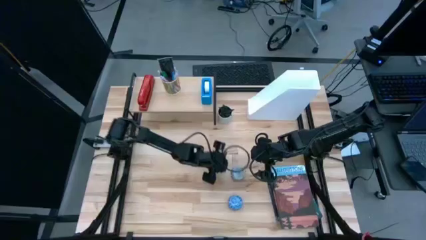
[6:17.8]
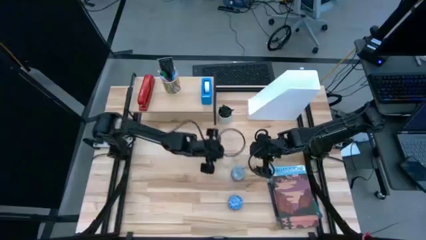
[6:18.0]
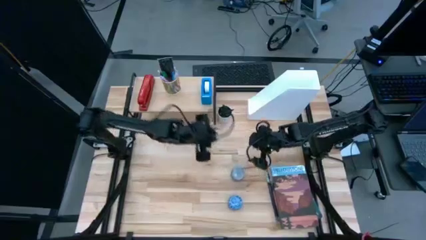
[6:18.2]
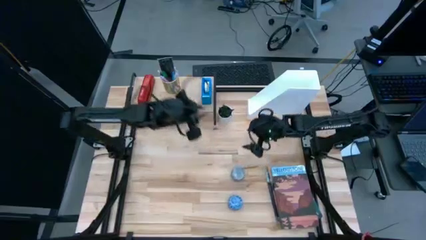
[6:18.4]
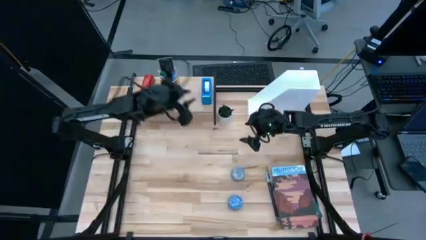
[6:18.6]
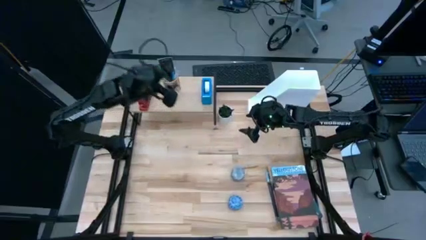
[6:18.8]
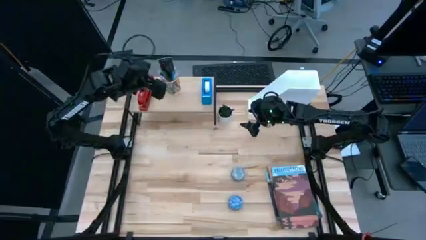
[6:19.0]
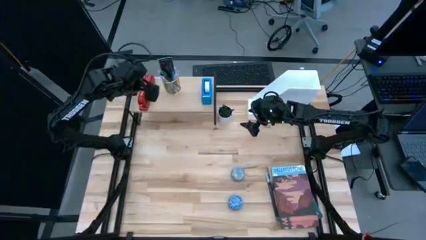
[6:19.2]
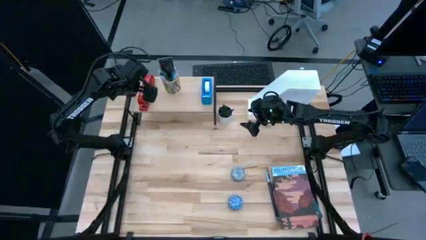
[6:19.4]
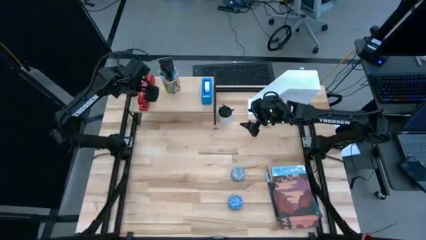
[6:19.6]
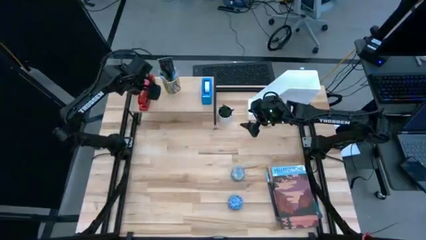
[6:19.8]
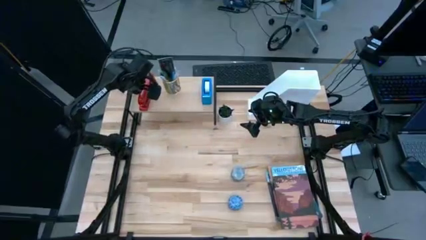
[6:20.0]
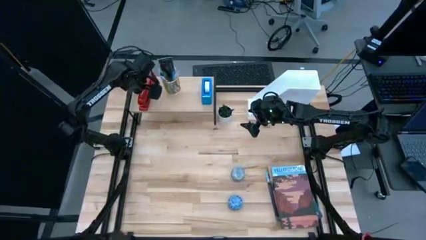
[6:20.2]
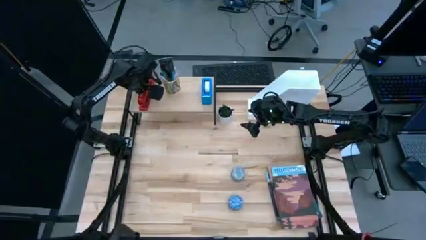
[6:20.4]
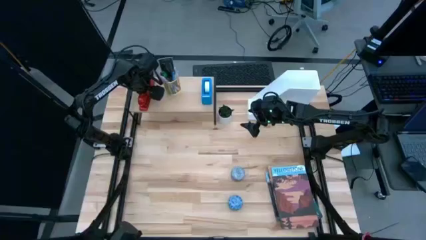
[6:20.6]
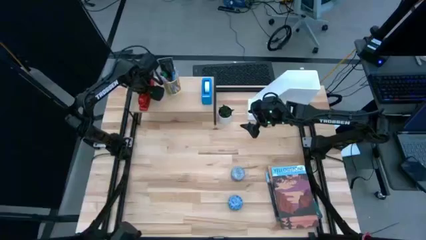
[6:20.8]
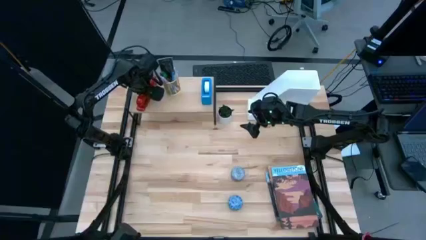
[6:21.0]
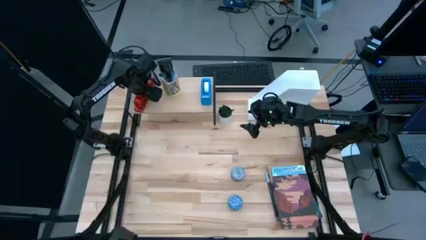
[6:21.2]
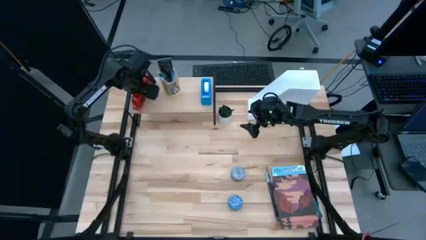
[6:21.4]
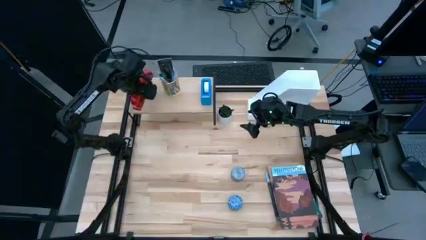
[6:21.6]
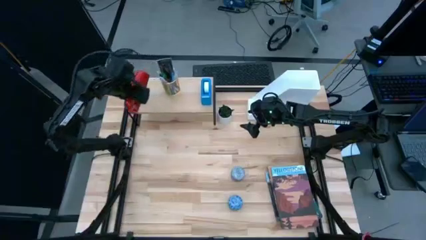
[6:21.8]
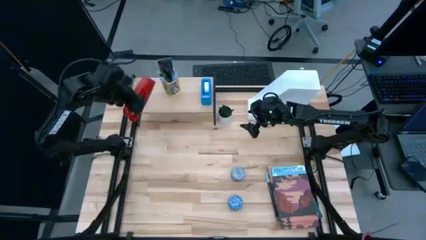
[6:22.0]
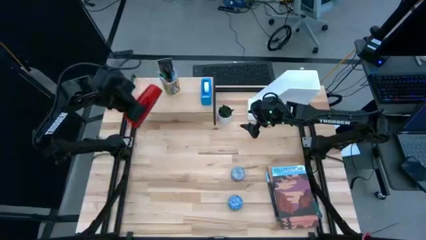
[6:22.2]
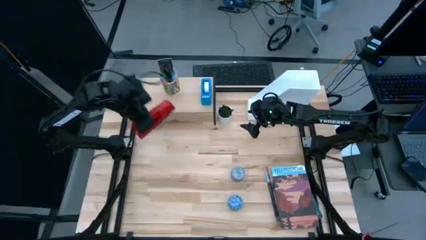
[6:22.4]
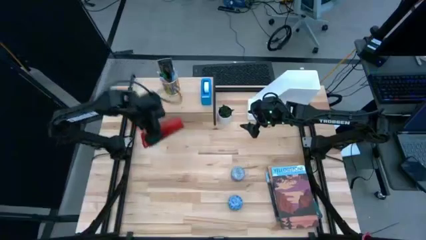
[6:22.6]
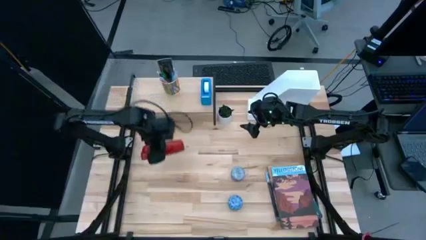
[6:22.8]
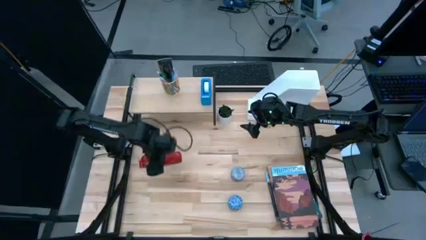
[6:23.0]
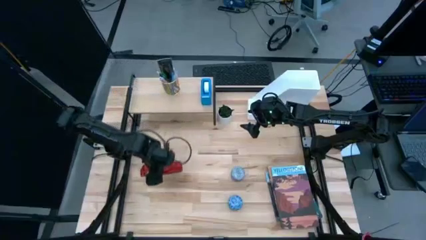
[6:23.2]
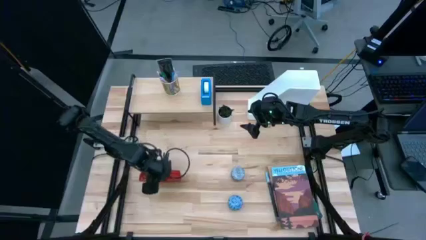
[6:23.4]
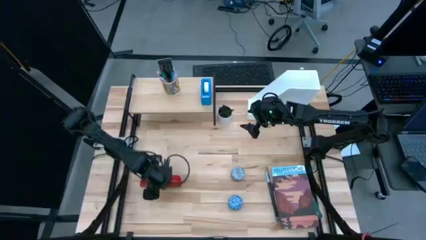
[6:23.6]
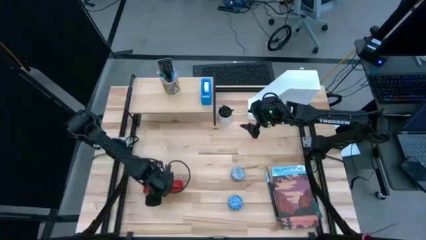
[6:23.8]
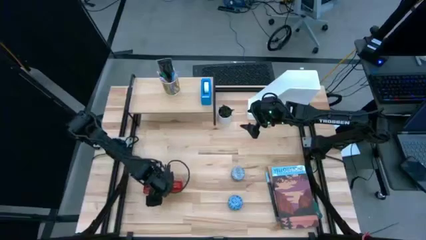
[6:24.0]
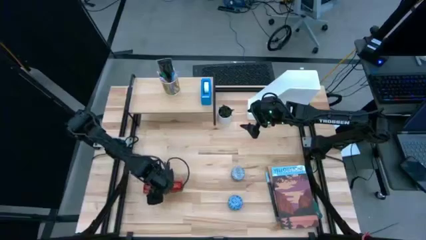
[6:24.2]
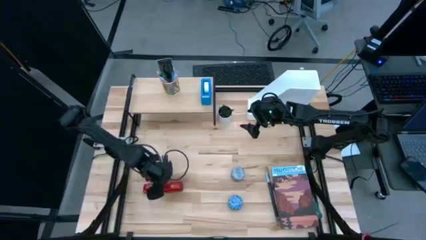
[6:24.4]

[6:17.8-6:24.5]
Task: Stock shelves
Remove the red stapler from the shelf

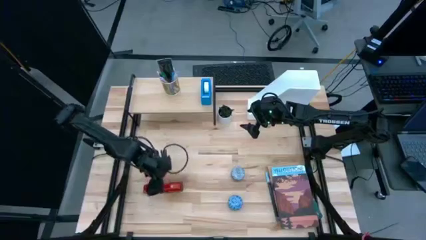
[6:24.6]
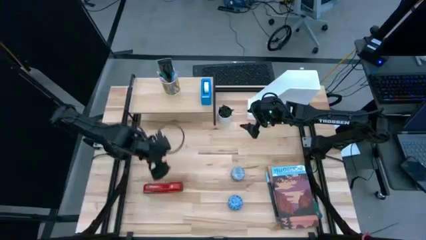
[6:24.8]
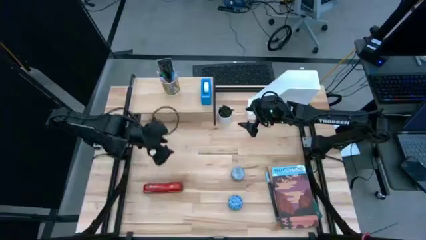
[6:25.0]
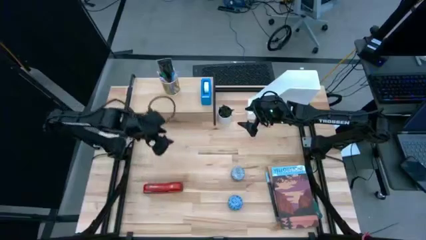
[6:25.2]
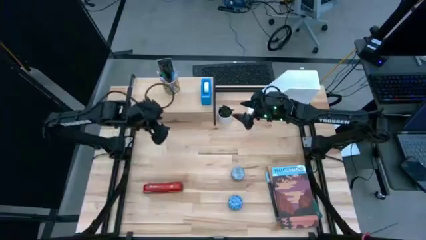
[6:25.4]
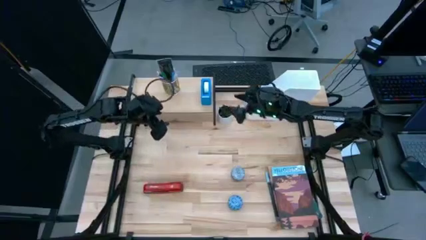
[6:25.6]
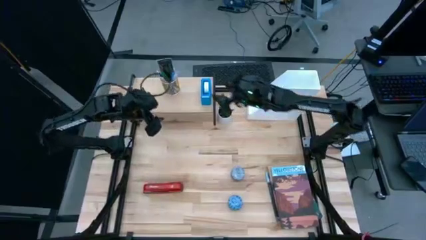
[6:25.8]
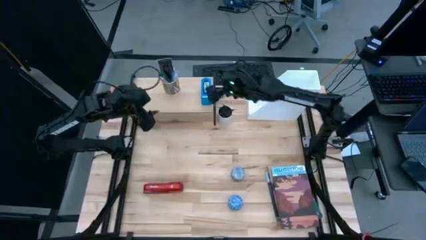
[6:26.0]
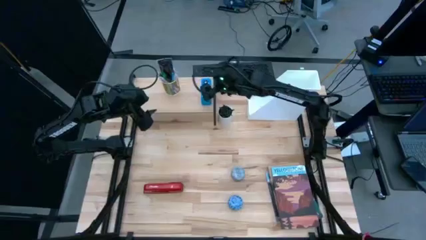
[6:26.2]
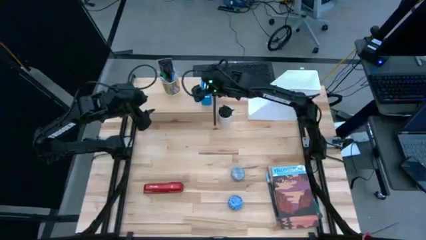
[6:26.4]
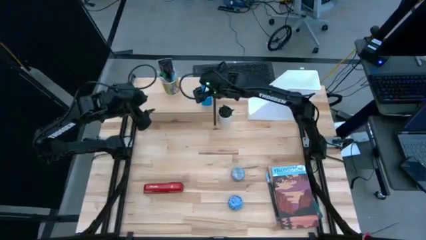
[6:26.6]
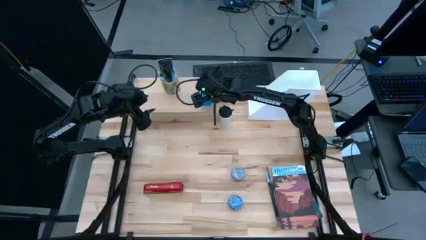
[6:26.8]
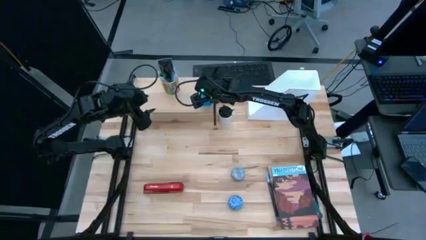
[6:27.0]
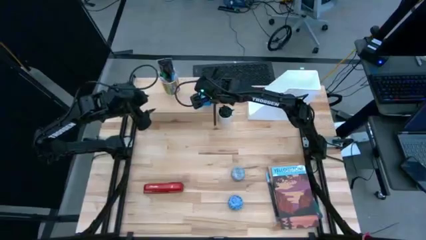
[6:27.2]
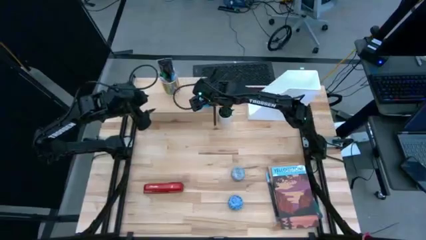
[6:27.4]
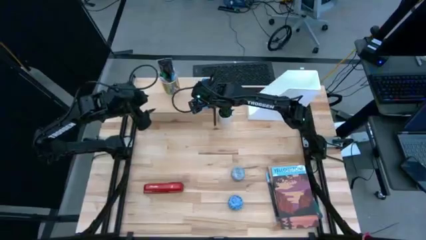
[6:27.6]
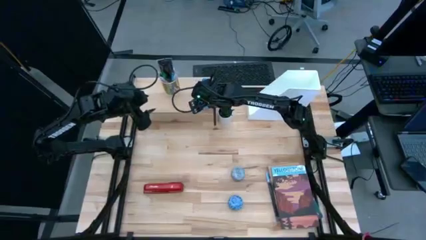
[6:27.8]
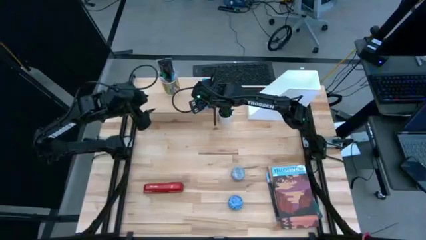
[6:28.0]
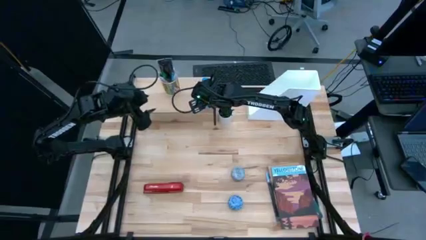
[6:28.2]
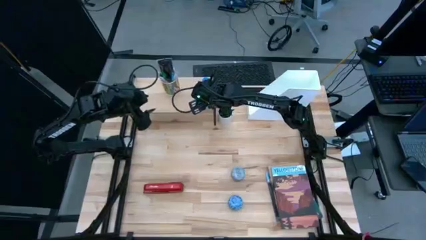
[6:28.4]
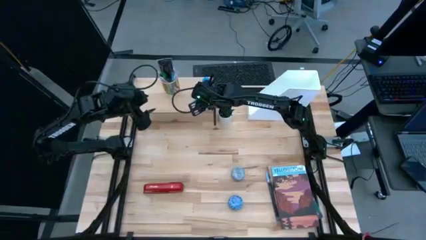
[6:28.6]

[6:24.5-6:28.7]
Remove the blue tape dispenser from the shelf

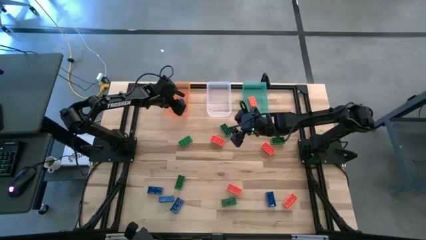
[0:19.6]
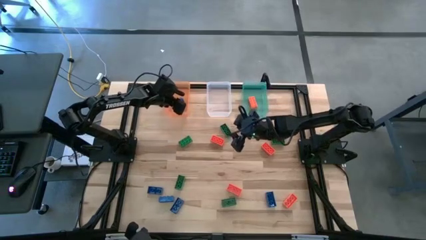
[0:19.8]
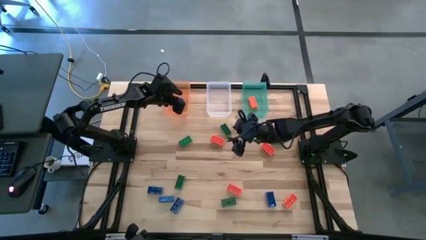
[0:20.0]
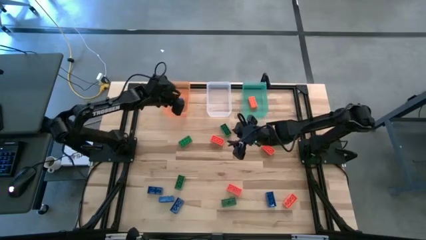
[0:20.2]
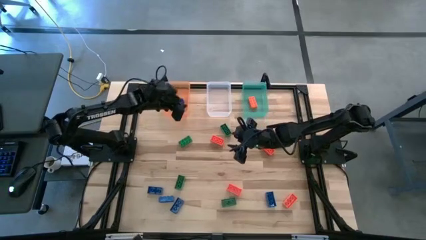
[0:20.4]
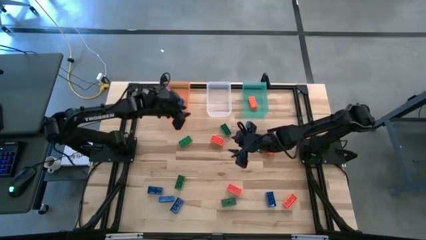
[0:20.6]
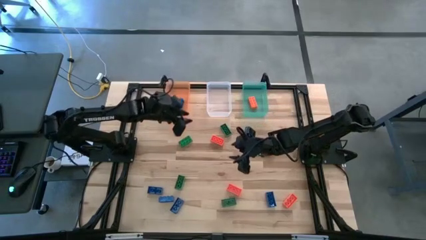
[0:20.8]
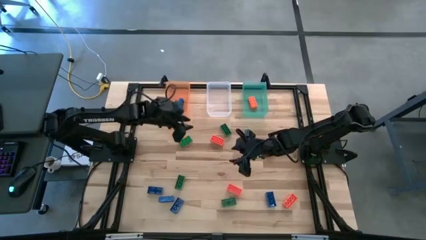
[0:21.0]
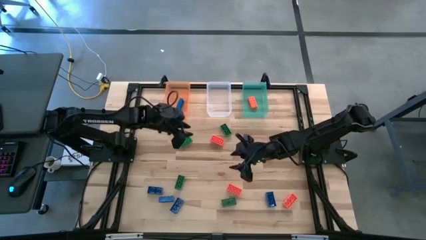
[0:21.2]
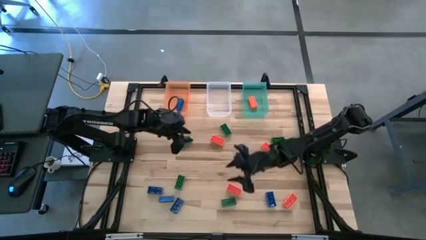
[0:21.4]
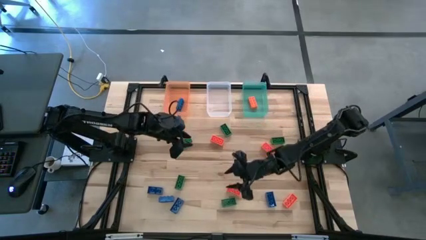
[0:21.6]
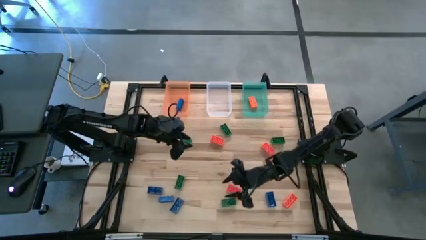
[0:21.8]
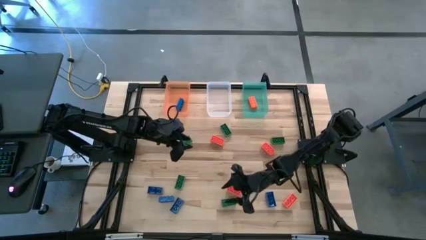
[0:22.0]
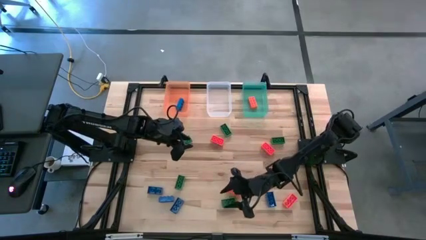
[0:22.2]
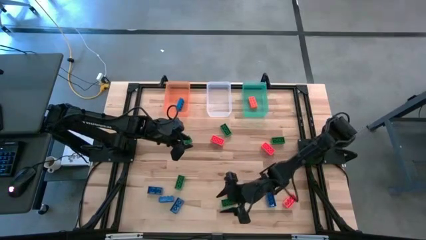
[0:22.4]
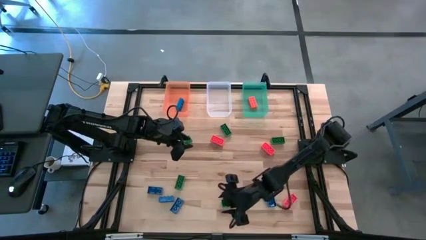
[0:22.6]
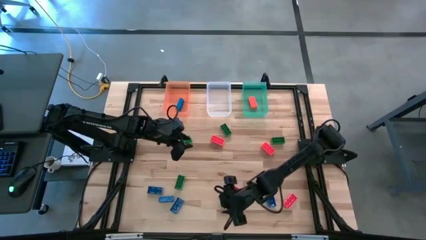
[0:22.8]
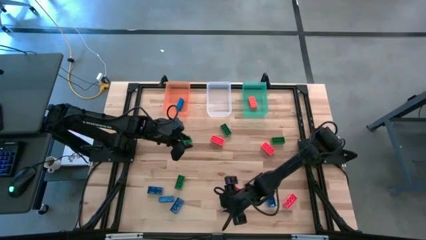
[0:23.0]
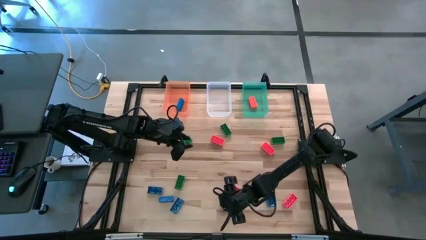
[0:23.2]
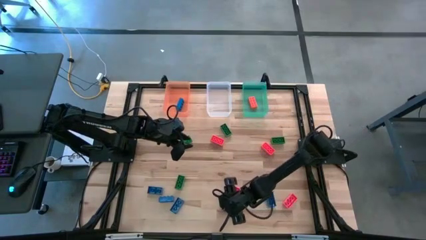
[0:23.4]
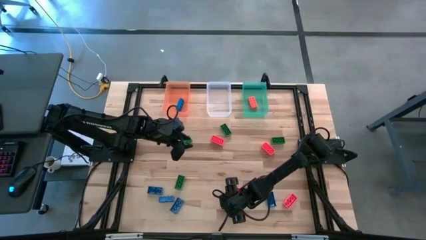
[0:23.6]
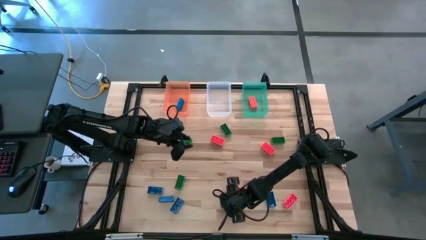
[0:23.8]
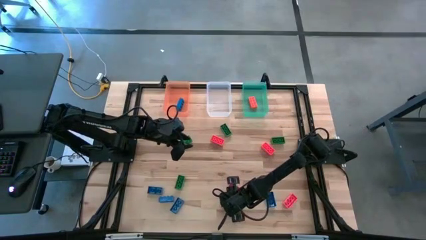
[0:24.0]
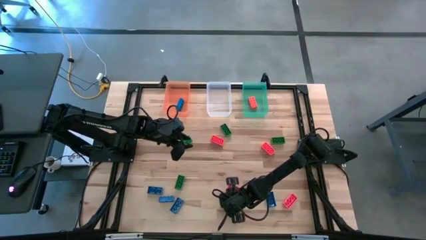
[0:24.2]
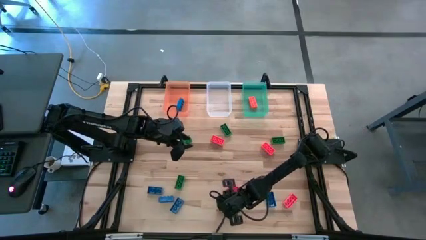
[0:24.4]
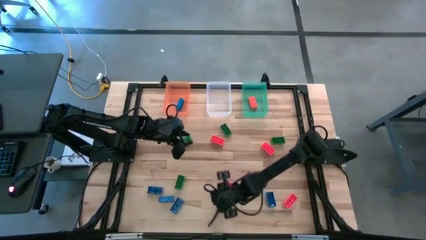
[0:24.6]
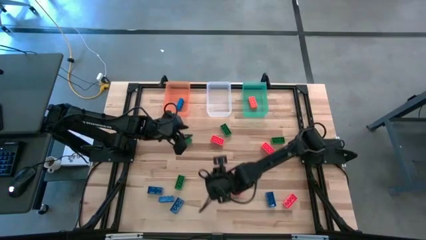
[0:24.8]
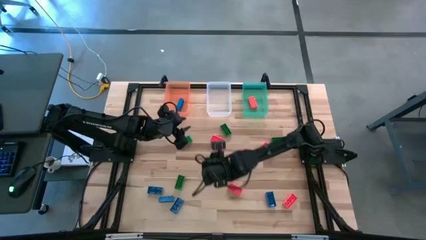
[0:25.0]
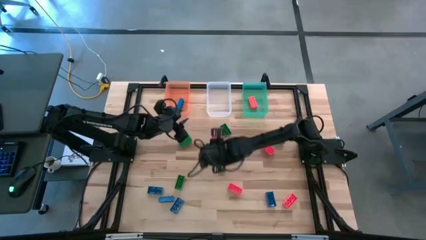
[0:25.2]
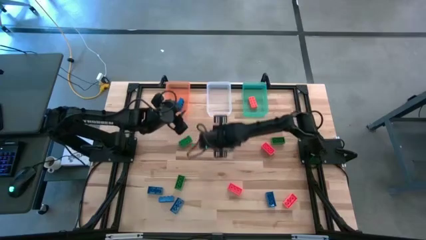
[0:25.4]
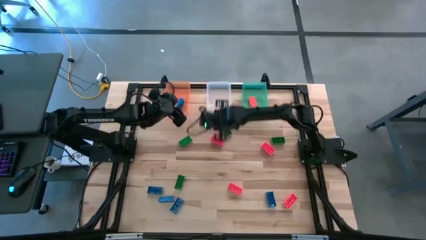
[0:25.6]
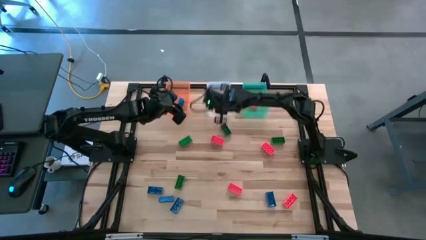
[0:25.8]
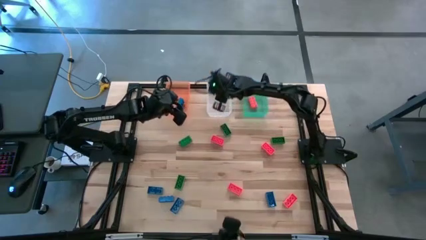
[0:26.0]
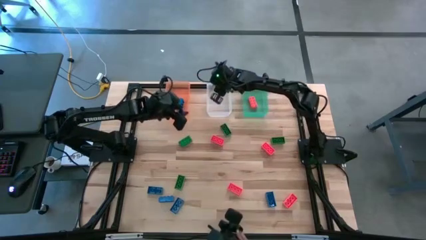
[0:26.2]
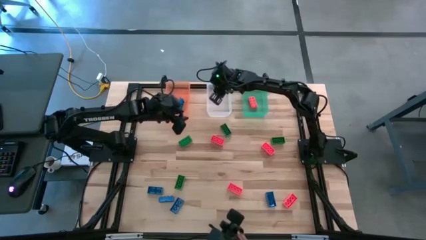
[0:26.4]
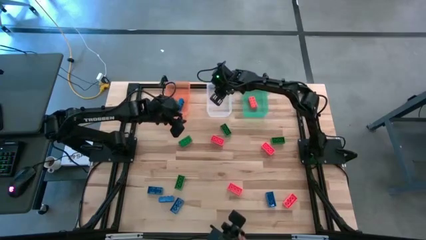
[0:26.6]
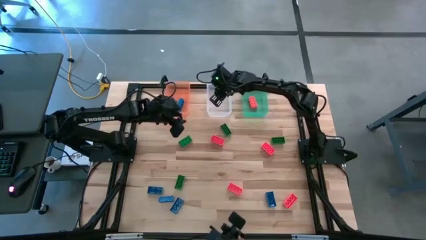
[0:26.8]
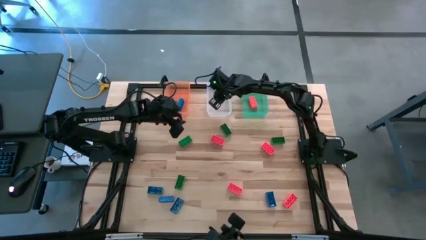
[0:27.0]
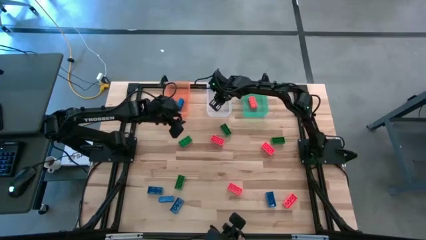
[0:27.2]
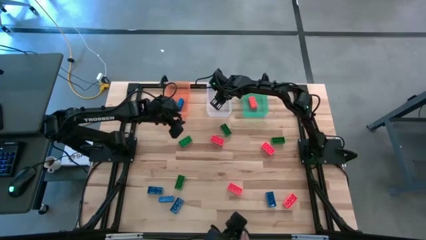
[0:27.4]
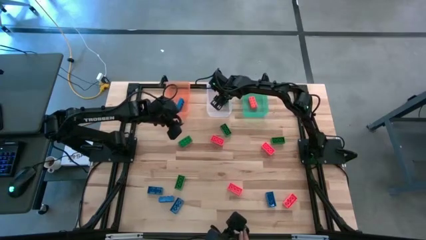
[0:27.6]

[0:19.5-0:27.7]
Task: Sort & place blocks by color
Put the green game piece into the bin
